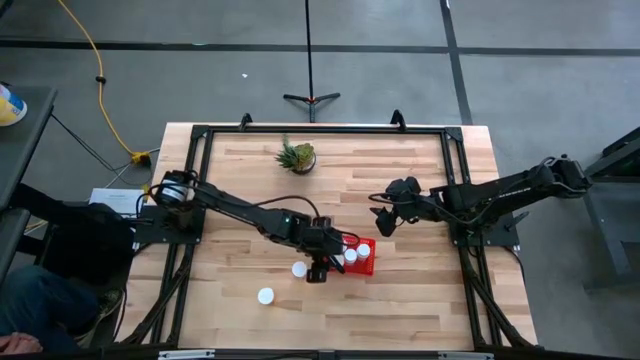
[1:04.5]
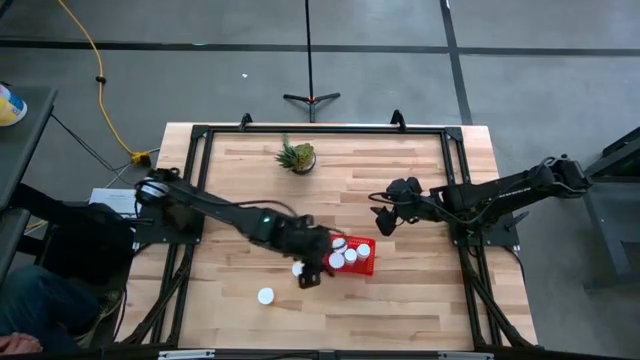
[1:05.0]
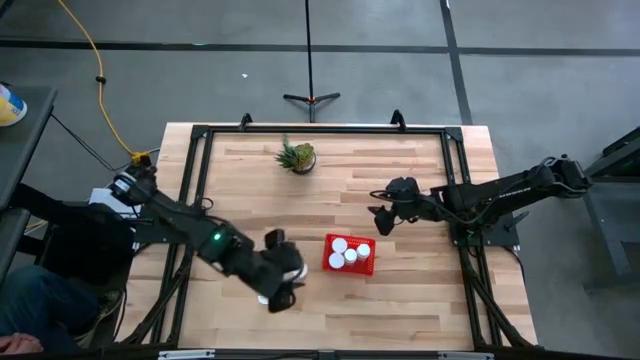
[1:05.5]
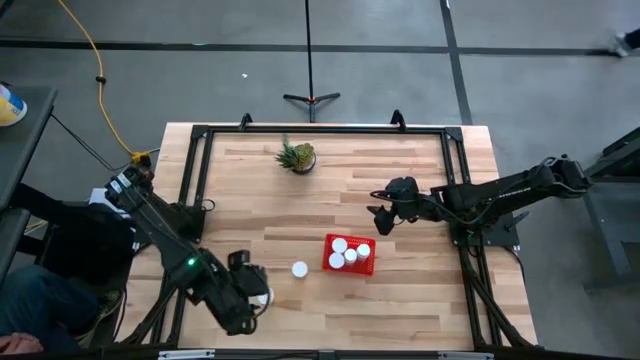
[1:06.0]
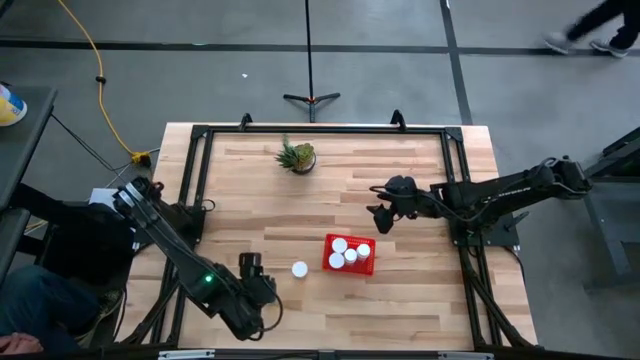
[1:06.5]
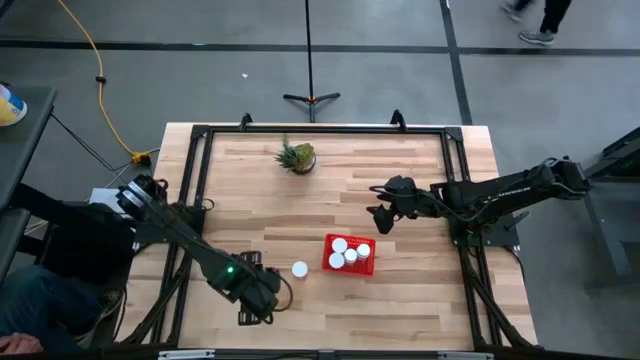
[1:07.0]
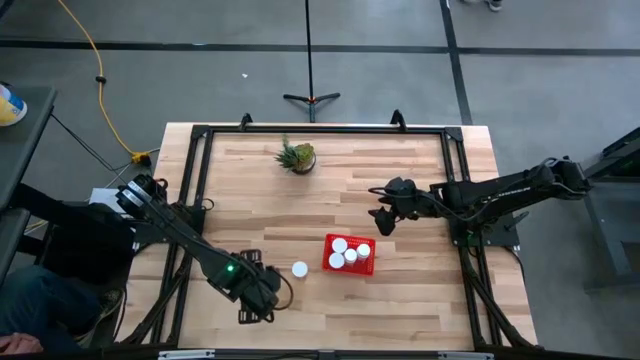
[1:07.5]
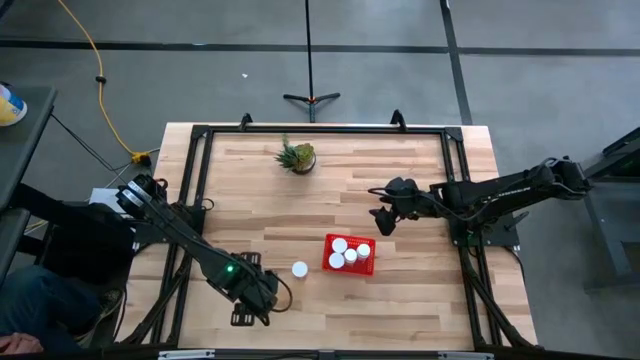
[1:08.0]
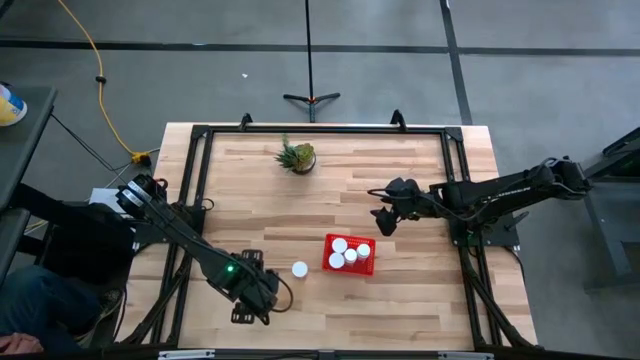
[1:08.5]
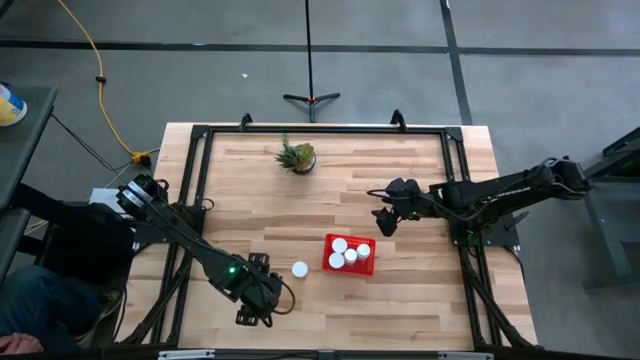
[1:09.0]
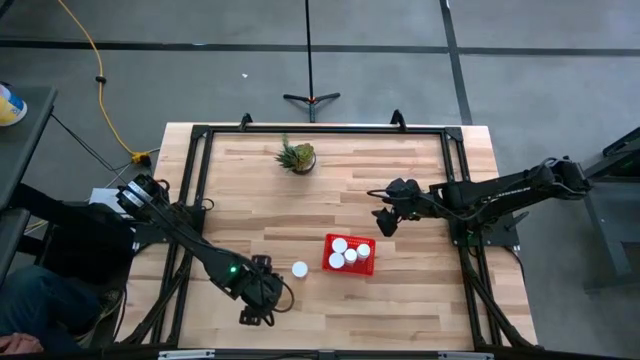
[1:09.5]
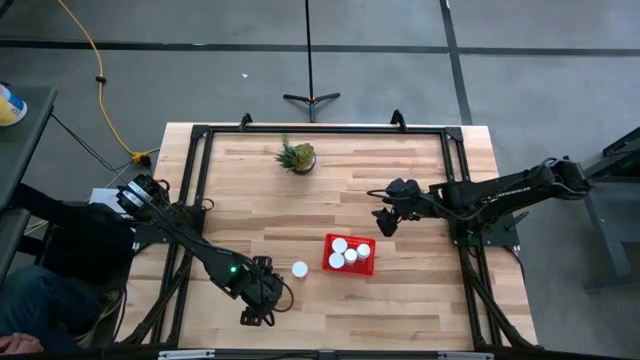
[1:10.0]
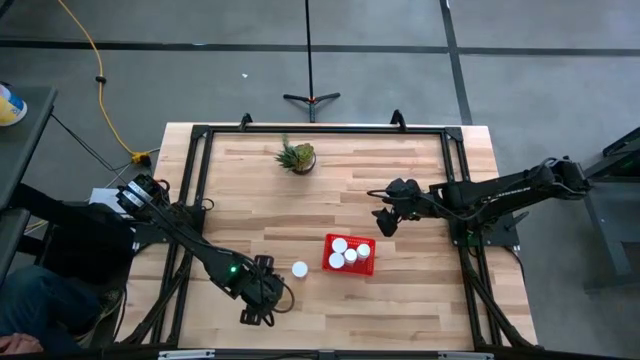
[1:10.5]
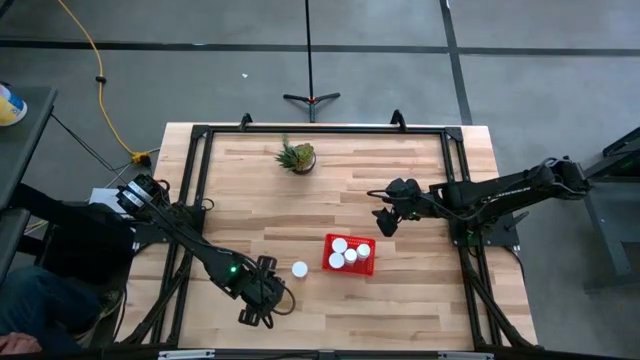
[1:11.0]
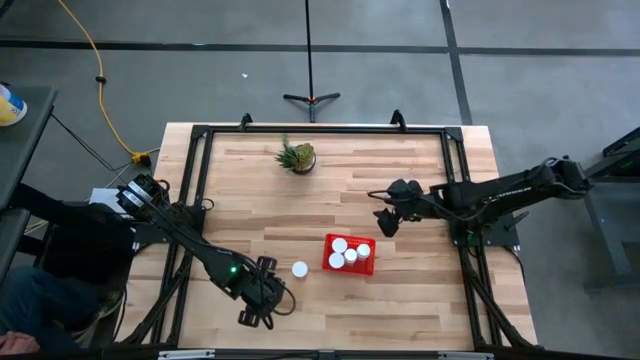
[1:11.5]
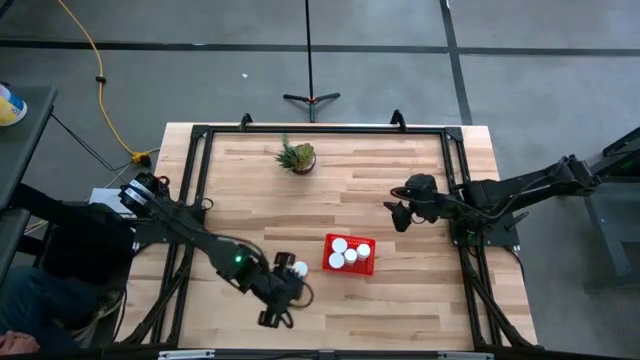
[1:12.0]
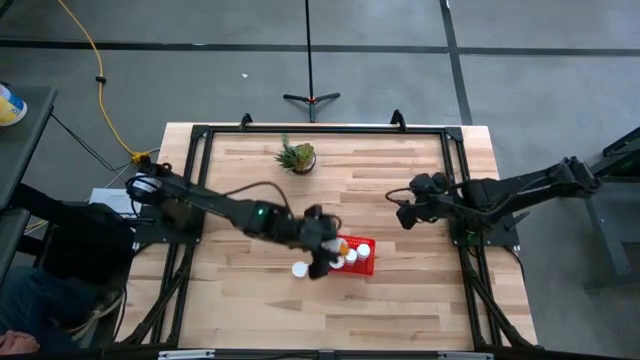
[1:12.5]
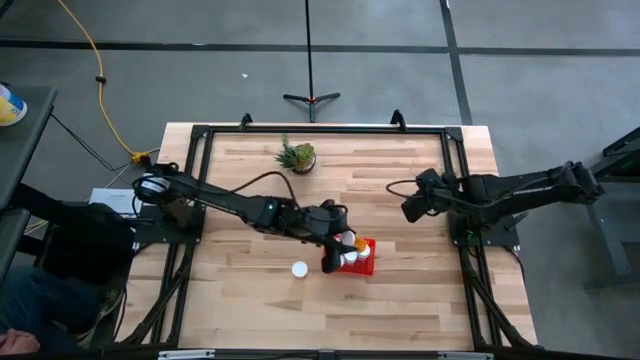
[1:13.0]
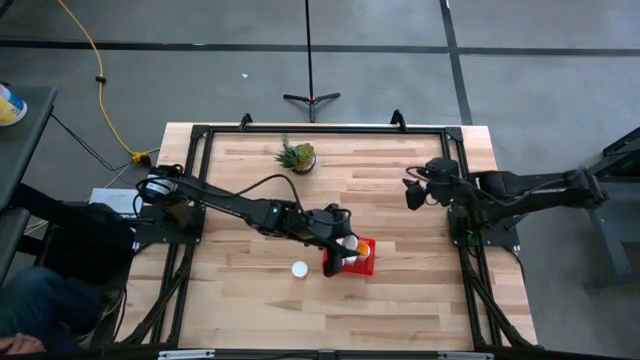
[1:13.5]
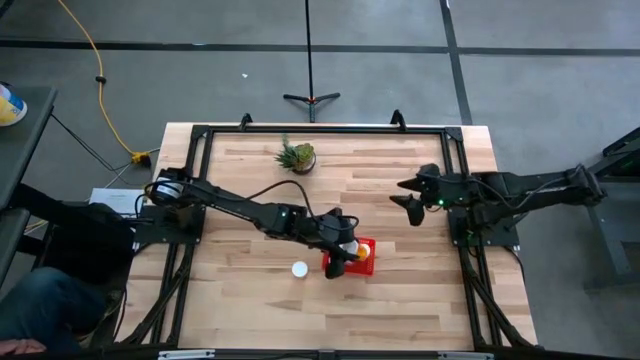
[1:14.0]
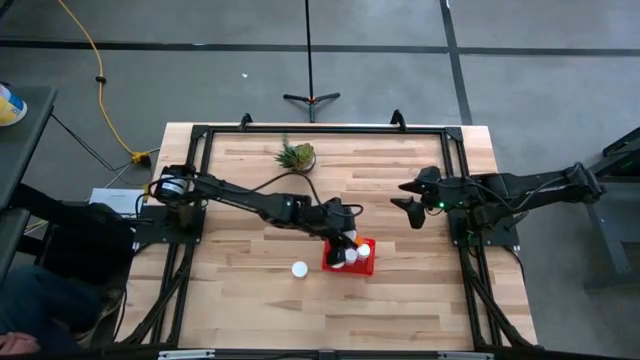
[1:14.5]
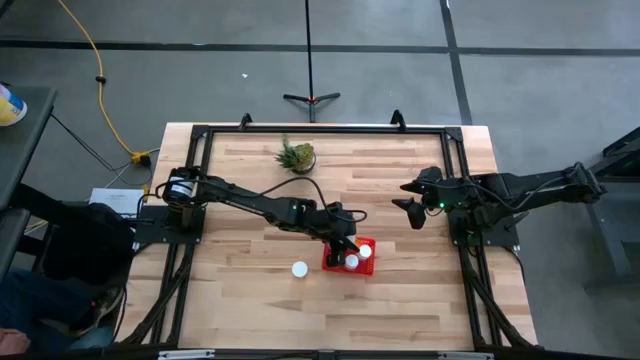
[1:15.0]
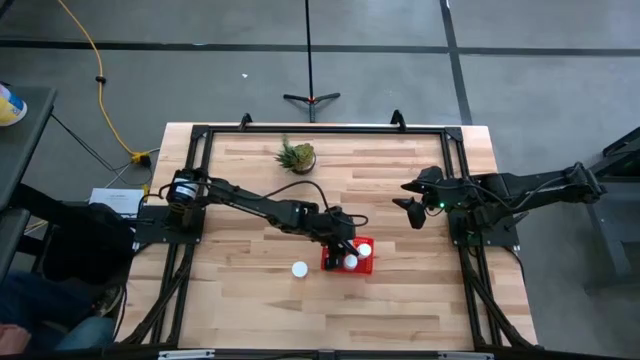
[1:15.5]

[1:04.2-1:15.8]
Task: Pick and place pill bottles into a basket
Put the orange pill bottle into the red bin

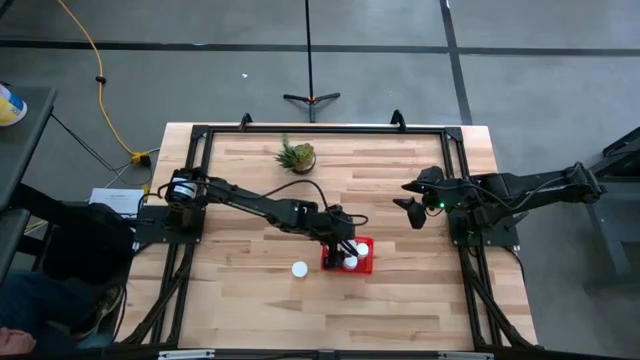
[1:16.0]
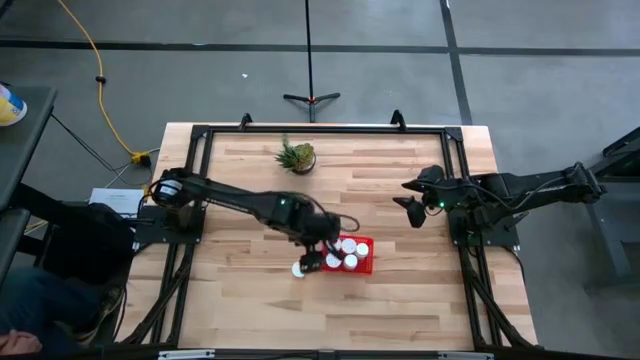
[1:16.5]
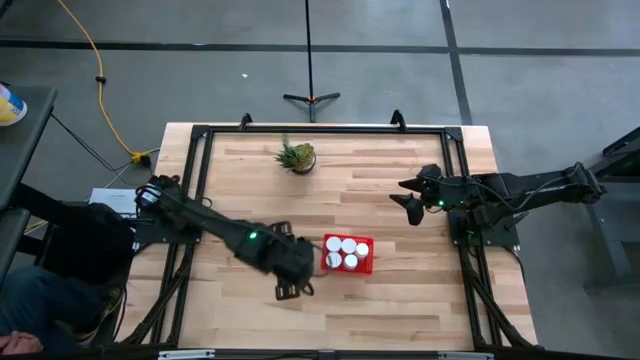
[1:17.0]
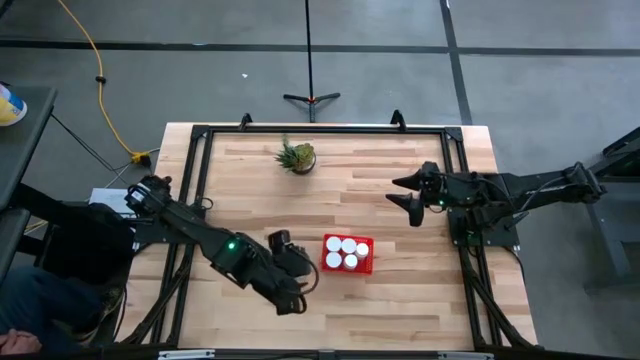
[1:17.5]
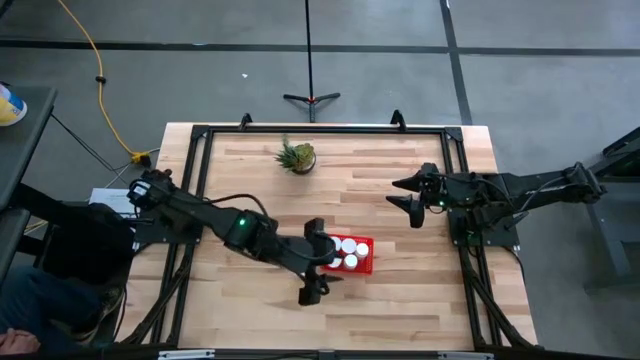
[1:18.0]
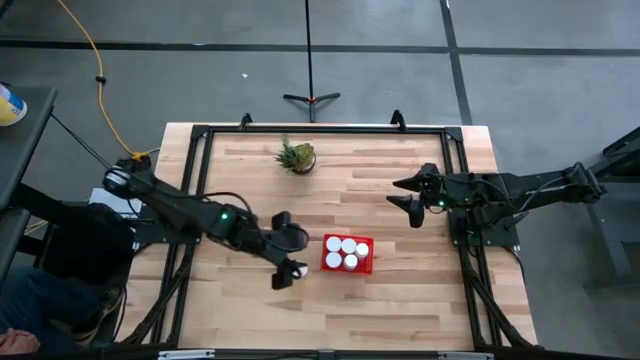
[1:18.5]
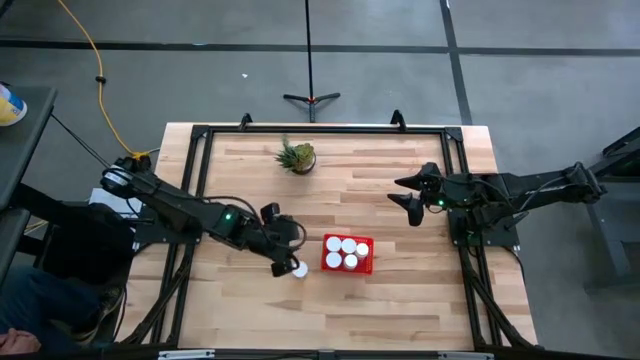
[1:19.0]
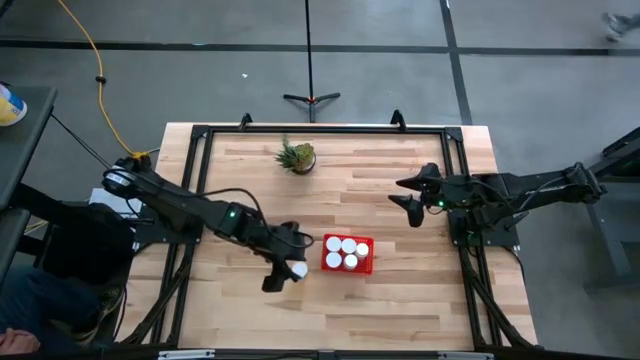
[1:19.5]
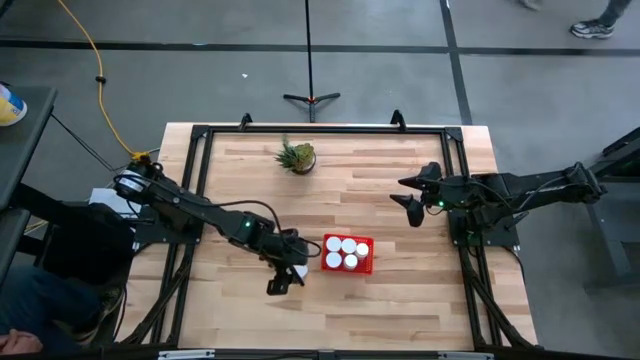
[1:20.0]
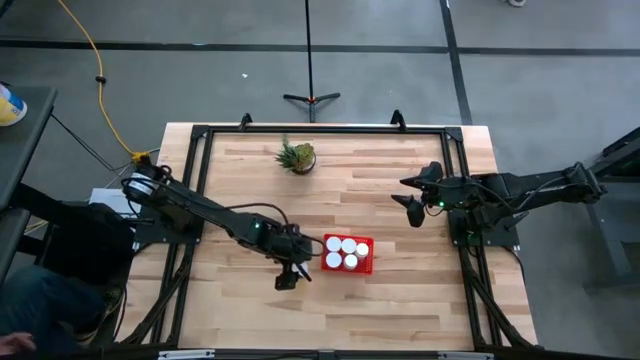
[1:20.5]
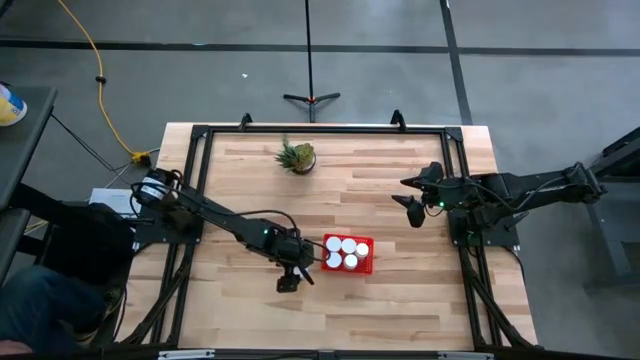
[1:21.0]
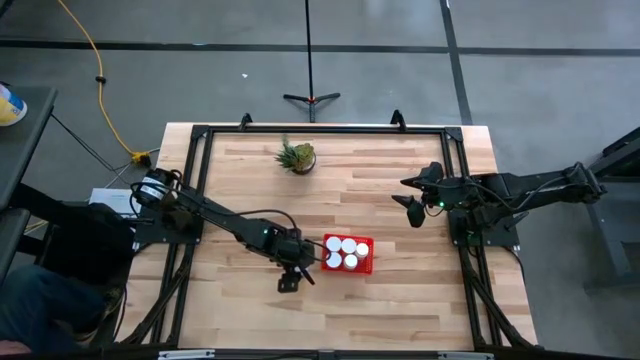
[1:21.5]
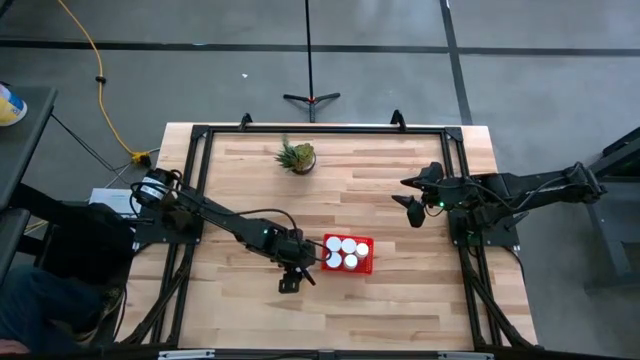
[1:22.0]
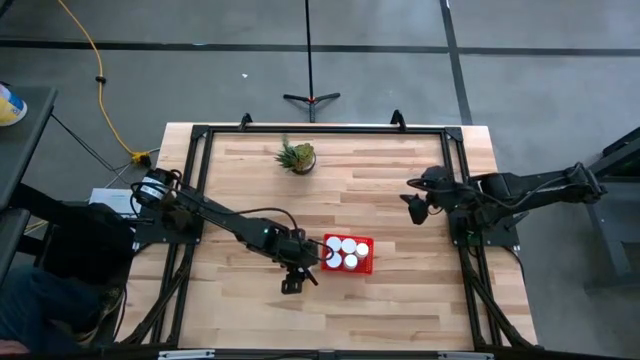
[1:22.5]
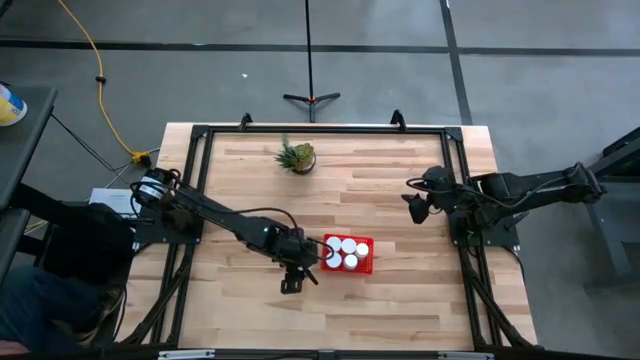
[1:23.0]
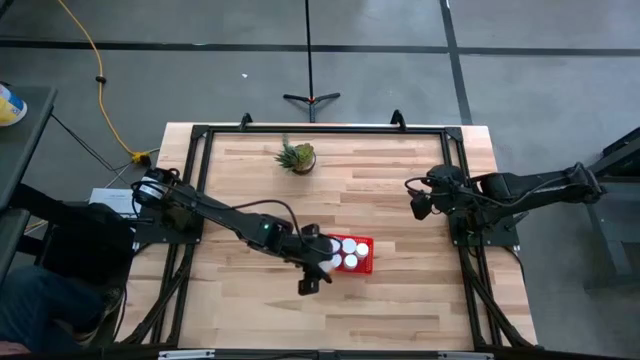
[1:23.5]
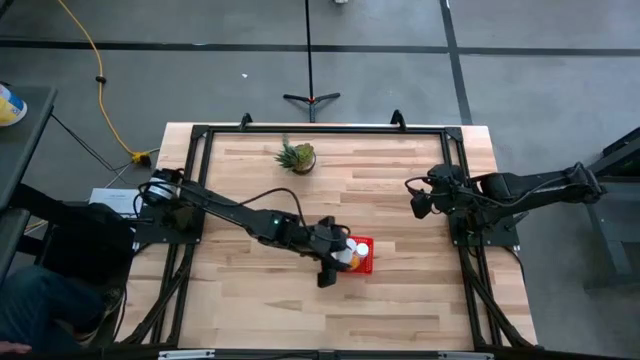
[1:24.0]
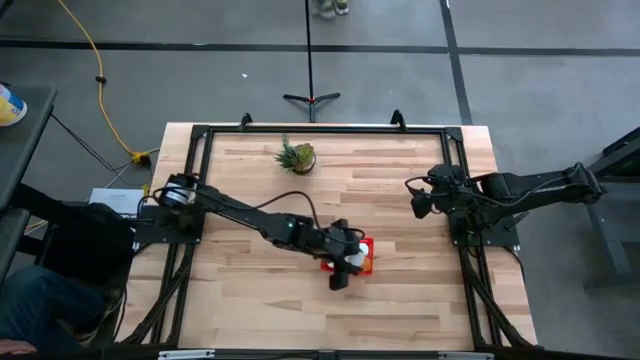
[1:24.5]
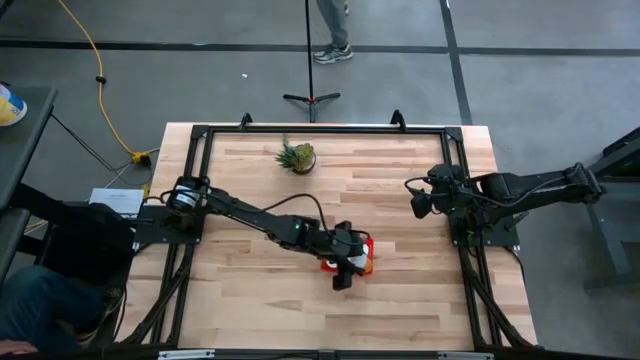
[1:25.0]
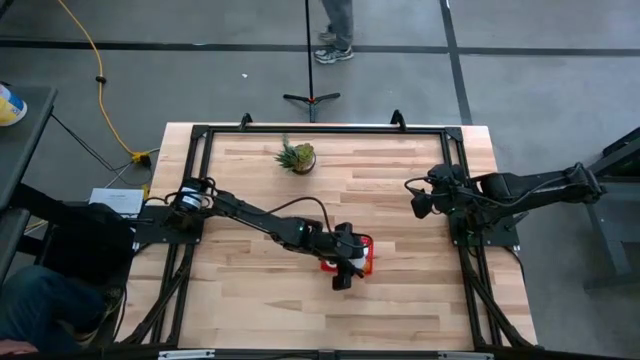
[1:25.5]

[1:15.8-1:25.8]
Put the orange pill bottle into the red bin
